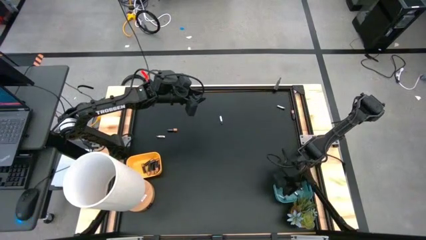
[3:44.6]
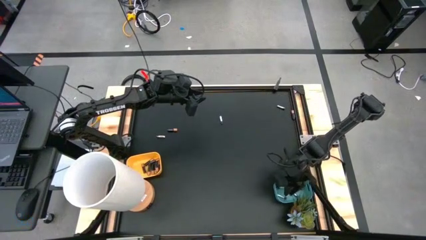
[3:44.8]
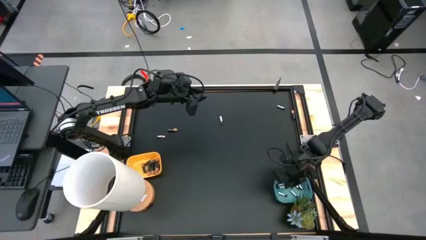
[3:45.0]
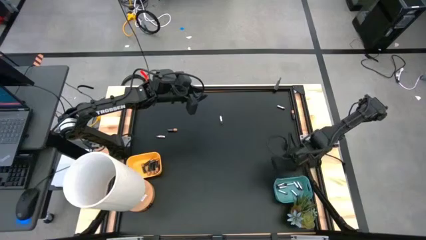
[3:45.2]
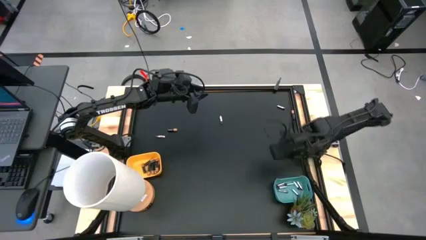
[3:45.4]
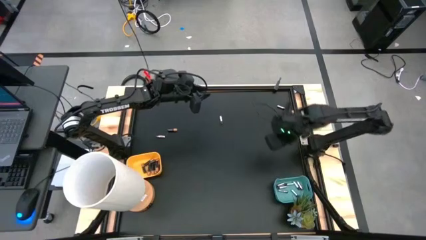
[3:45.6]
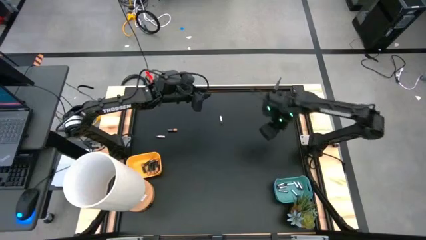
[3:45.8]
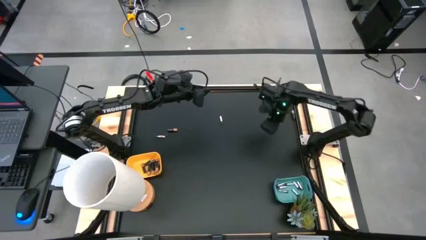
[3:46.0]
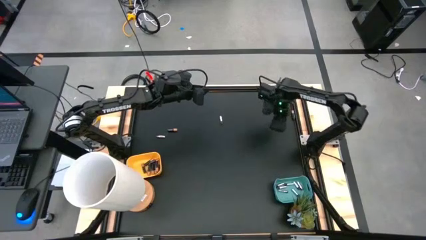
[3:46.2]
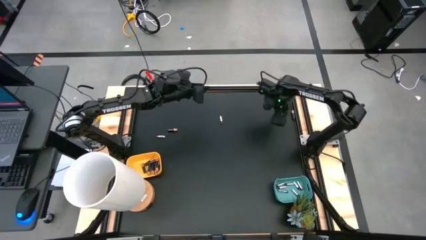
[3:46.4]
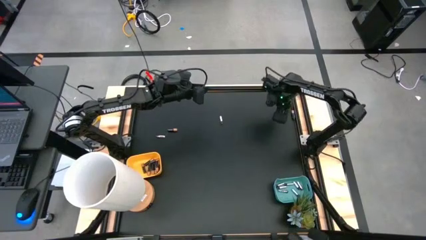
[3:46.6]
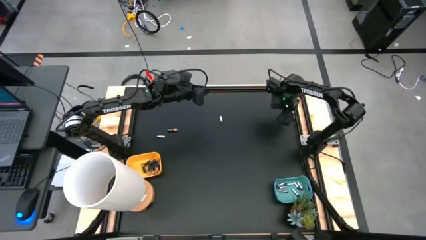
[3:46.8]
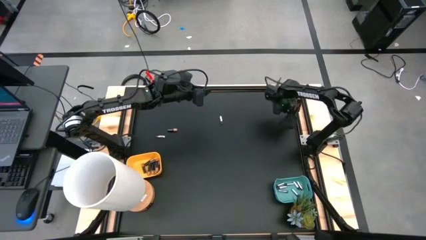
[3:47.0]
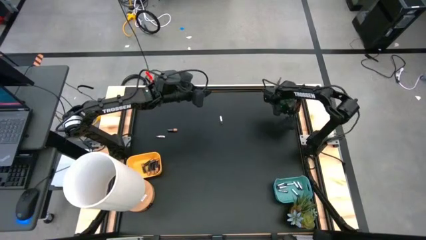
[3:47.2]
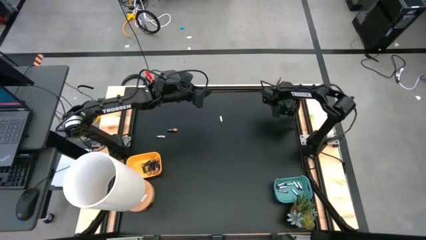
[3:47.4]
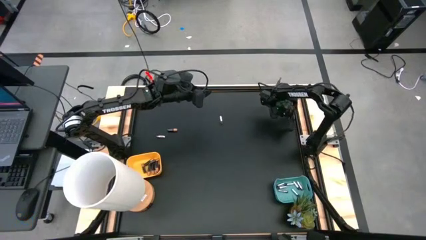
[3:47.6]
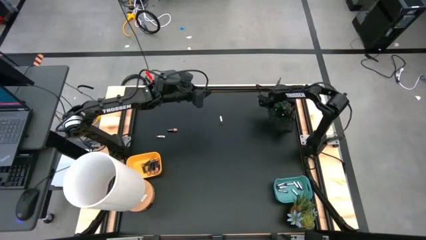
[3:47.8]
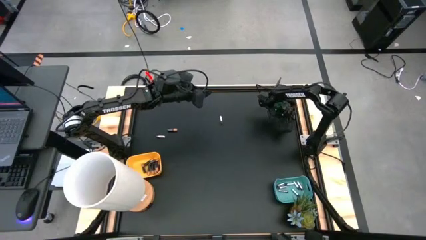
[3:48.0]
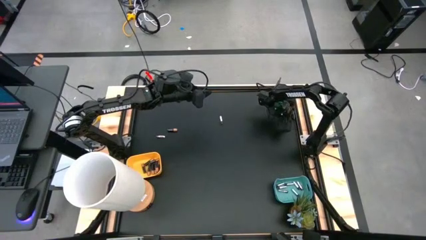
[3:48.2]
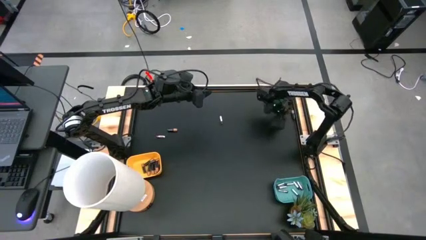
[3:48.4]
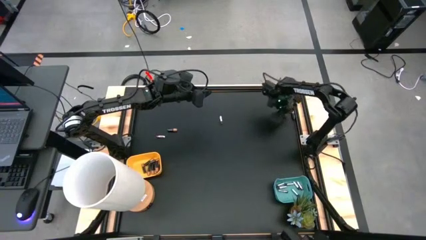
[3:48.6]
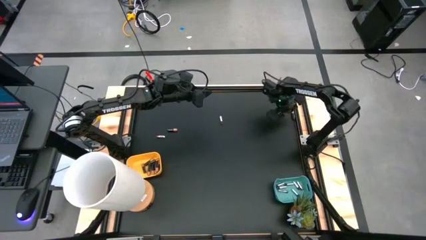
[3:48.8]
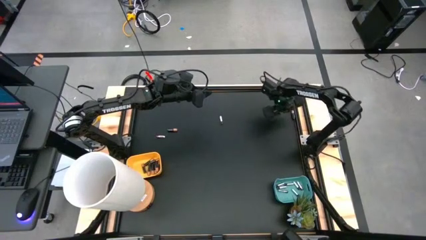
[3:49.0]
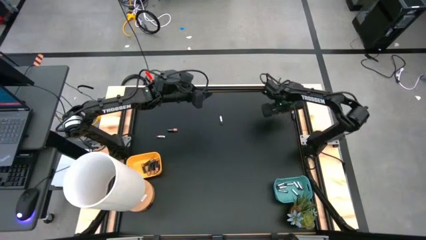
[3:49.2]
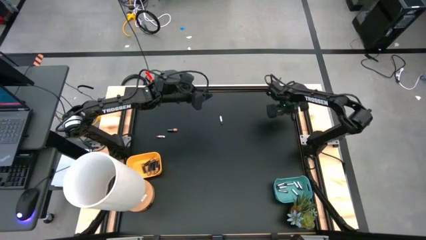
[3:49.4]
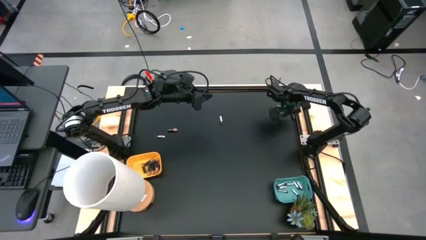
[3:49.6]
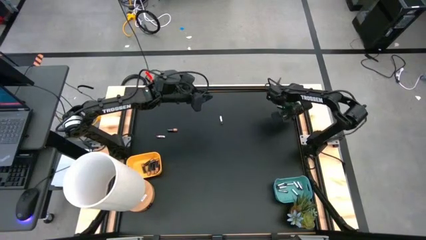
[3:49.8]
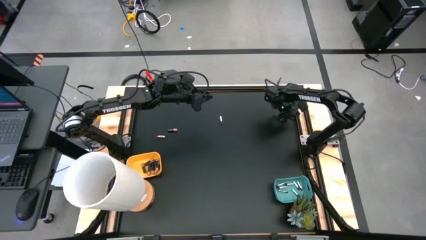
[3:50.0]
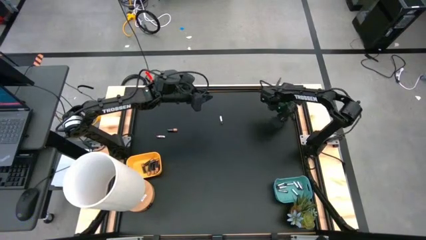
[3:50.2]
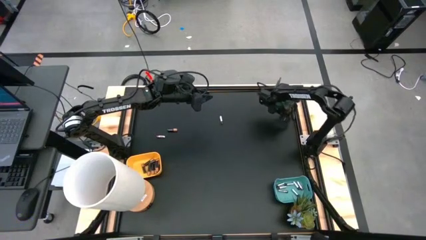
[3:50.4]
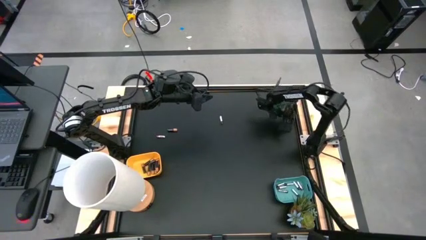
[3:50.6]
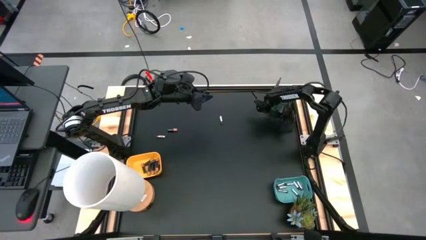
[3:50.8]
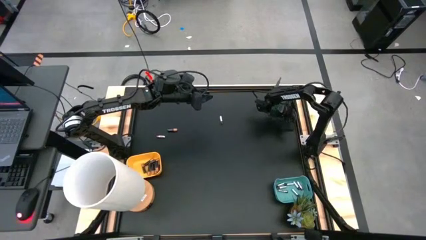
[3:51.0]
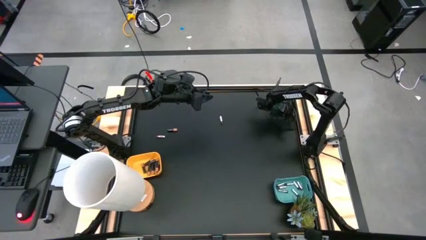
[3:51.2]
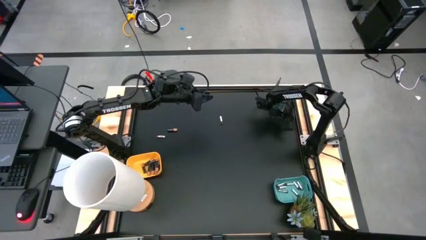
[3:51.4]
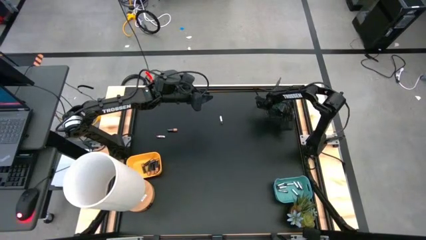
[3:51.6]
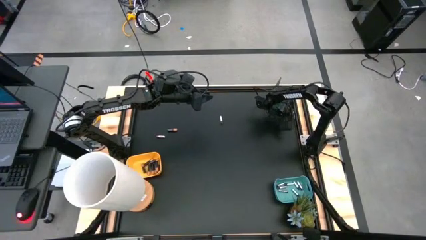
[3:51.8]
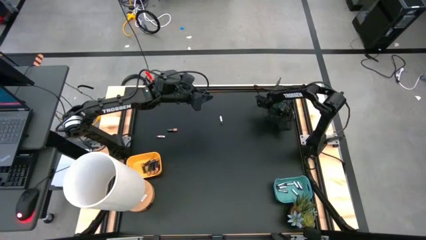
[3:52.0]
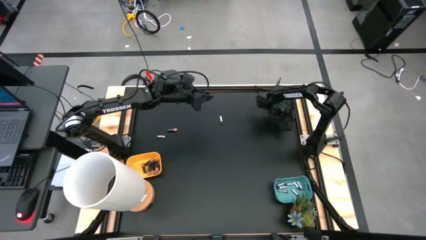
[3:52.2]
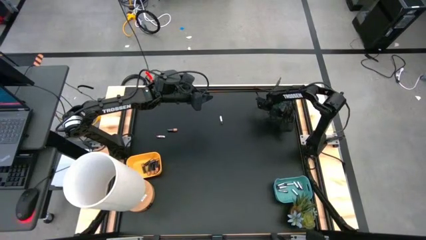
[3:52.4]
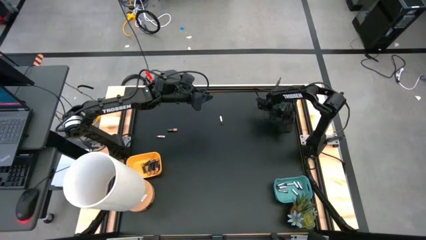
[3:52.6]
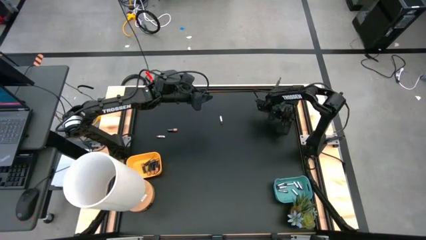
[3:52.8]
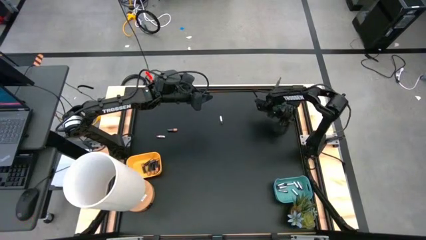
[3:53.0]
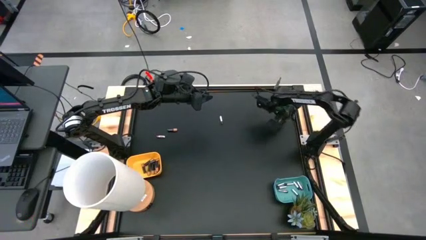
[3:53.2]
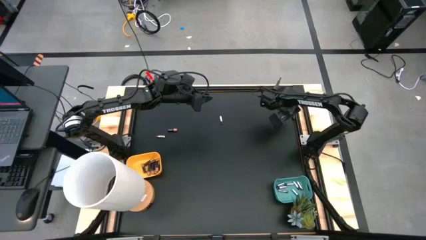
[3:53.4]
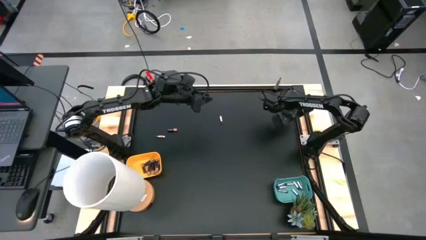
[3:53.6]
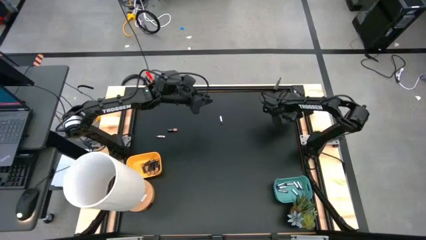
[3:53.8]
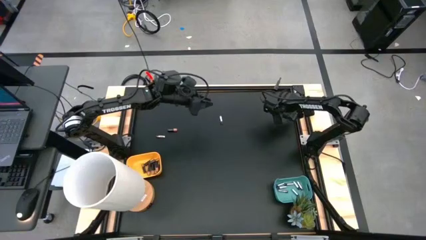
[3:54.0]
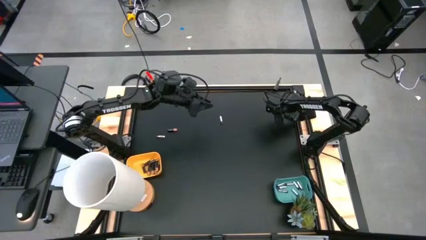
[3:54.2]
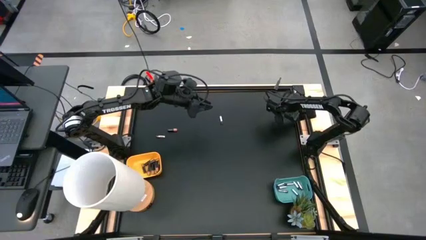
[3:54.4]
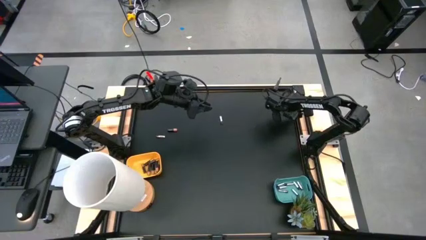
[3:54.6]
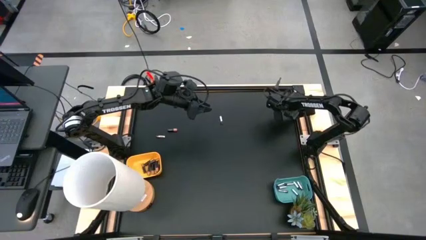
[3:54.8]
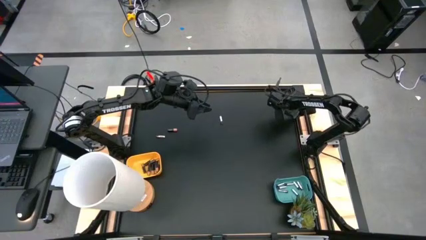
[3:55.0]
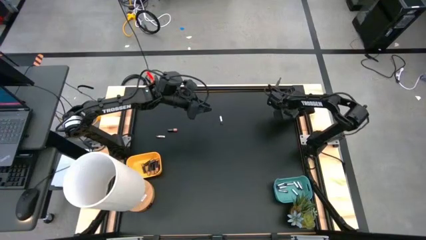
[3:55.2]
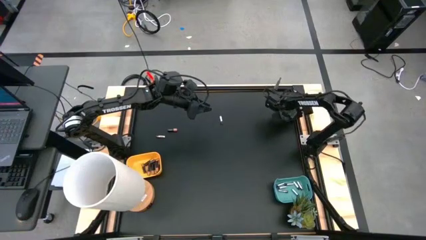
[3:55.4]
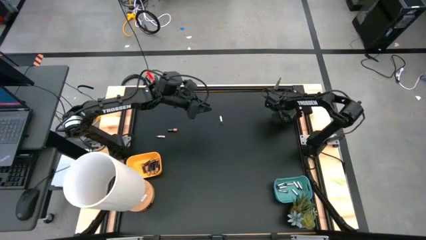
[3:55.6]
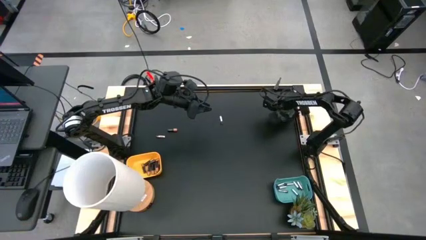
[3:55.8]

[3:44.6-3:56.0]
Task: Sort batteries
Put the black battery into the yellow bin

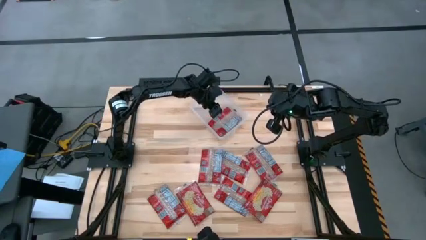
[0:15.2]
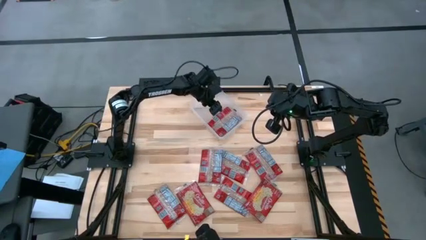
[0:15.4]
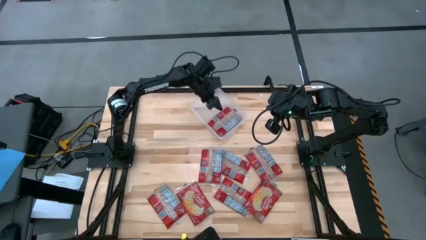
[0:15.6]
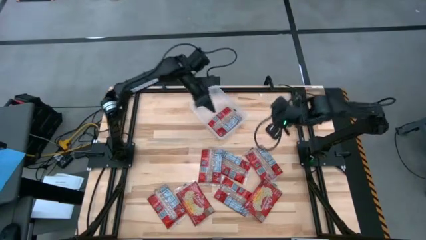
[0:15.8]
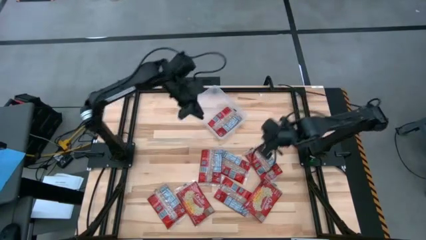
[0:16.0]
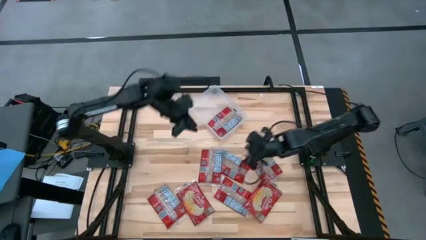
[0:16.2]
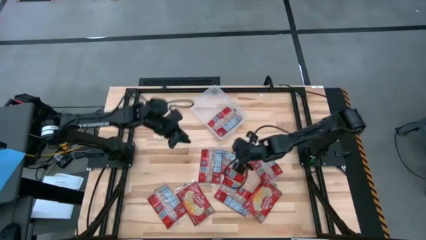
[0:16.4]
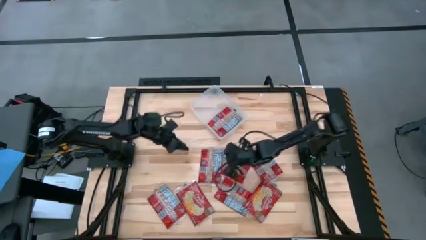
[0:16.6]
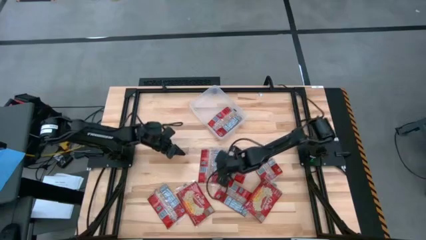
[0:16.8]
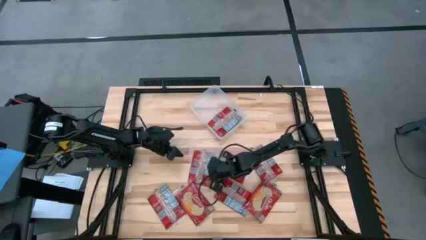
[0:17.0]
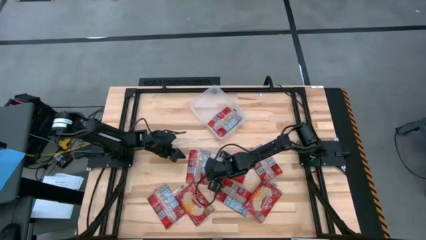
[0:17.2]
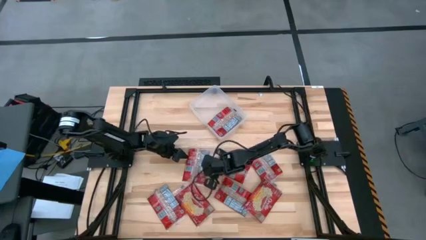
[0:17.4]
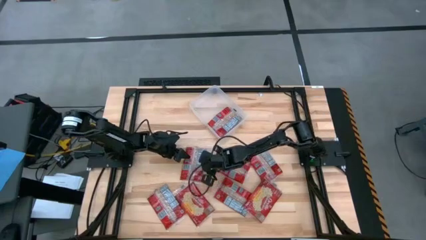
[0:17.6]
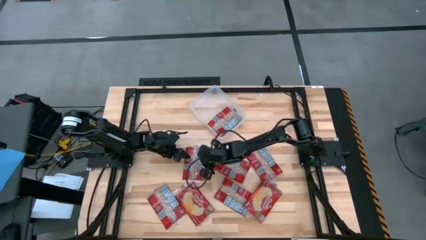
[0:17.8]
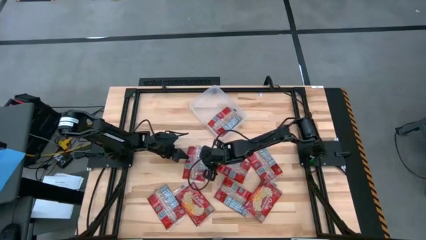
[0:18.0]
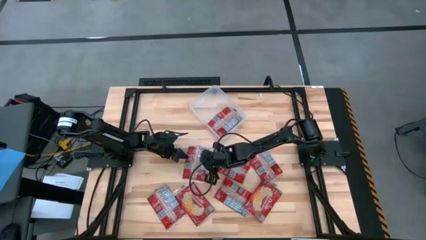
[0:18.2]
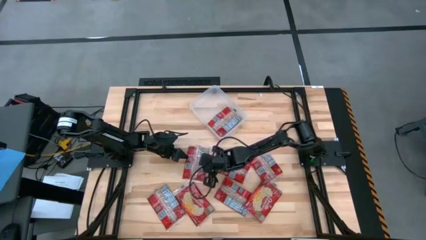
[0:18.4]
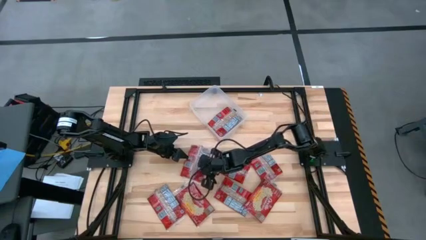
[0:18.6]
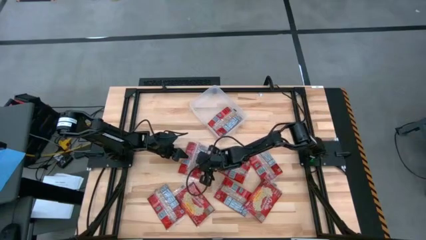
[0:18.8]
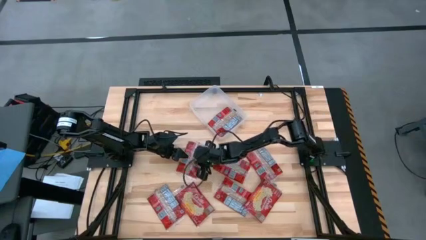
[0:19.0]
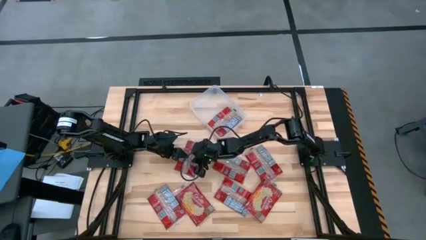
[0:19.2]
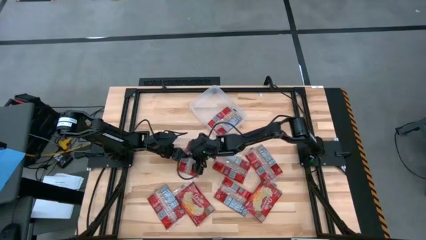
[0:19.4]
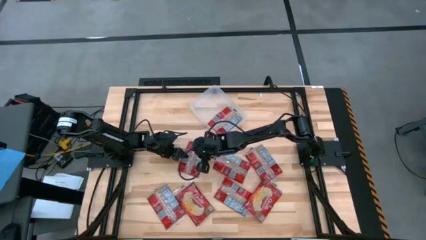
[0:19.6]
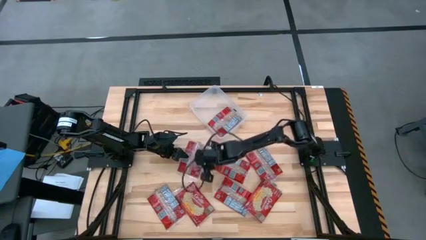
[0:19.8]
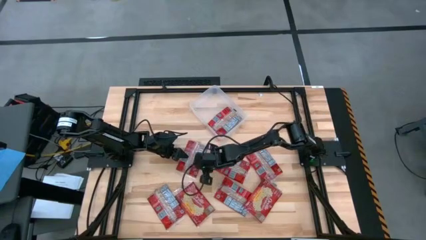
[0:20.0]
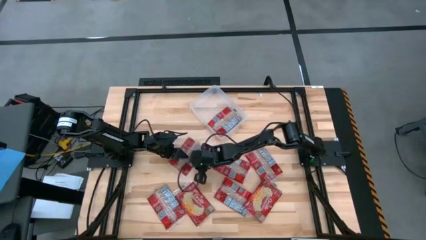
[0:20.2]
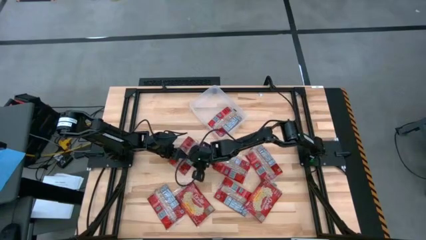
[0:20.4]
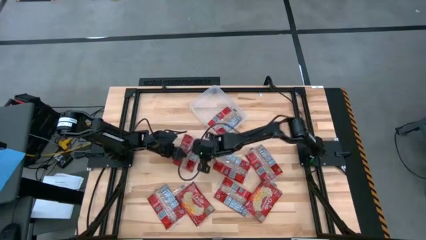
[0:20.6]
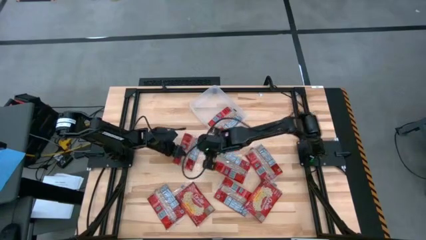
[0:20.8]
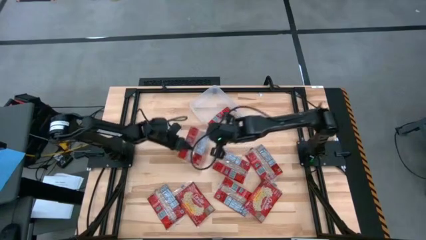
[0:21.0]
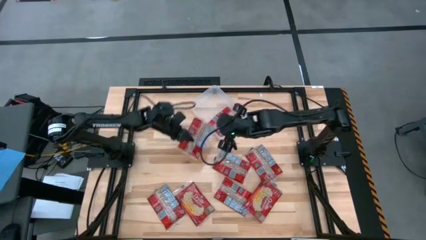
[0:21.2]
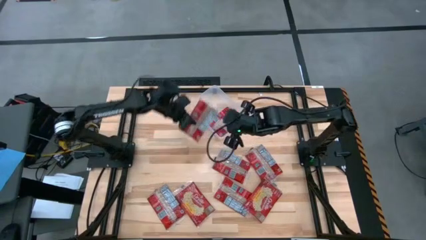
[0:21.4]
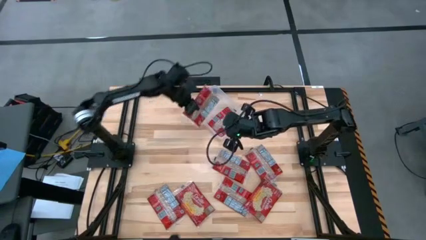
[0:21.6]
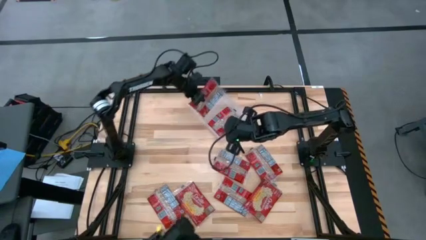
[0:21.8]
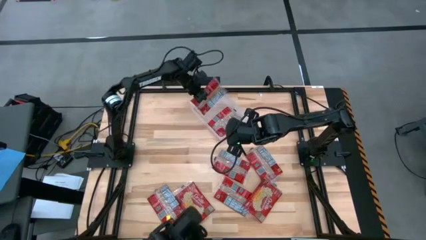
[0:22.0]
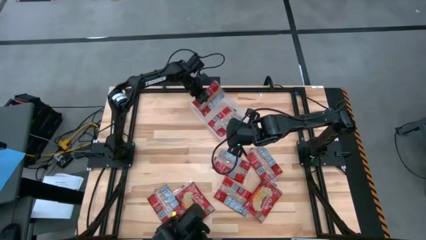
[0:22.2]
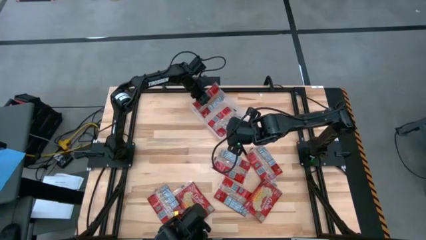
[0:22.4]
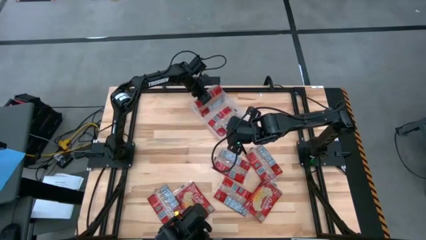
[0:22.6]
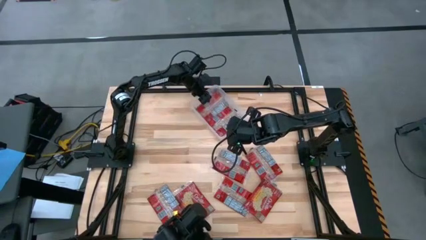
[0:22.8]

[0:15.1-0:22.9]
Task: Sort popcorn bags into baskets
Put the red popcorn bag into the white bin
